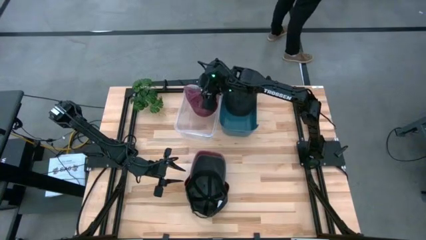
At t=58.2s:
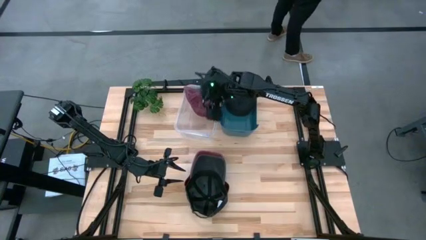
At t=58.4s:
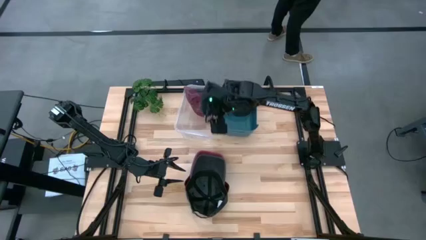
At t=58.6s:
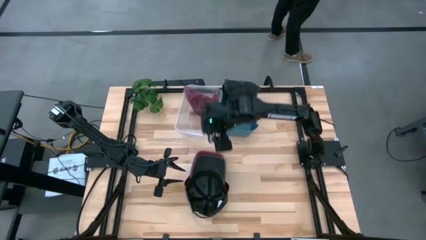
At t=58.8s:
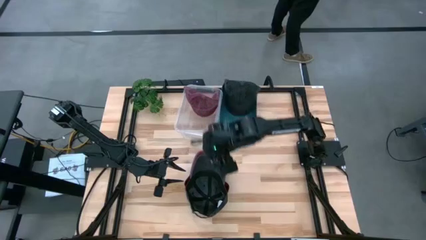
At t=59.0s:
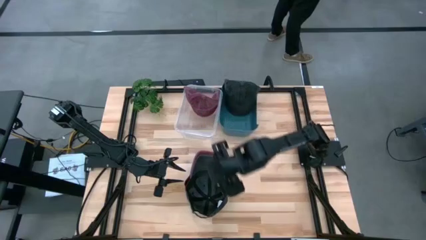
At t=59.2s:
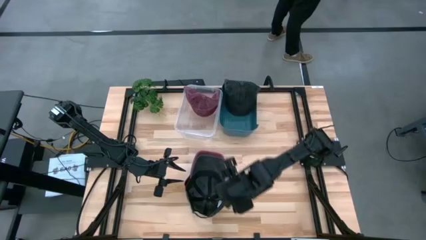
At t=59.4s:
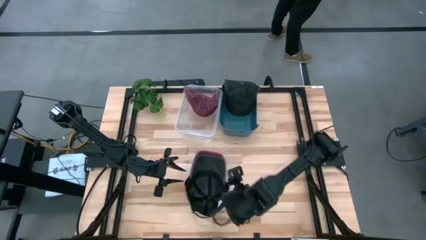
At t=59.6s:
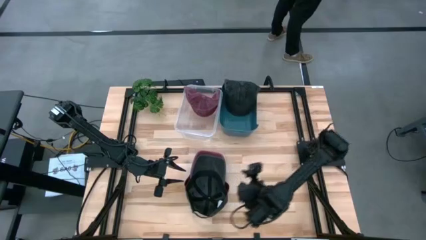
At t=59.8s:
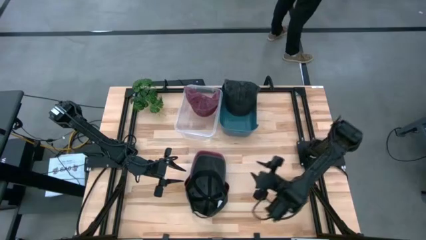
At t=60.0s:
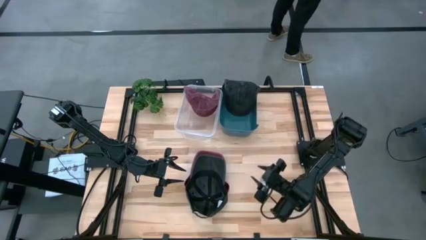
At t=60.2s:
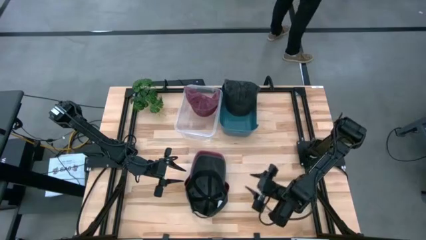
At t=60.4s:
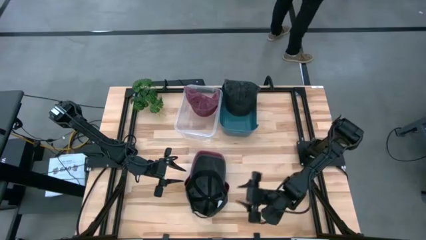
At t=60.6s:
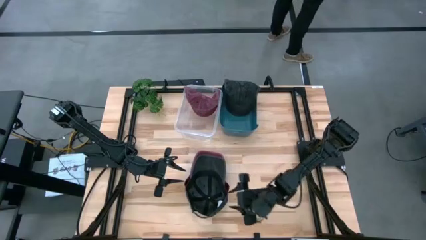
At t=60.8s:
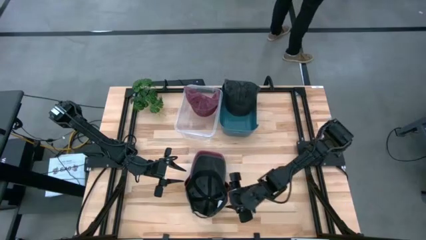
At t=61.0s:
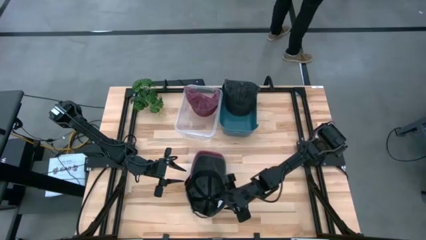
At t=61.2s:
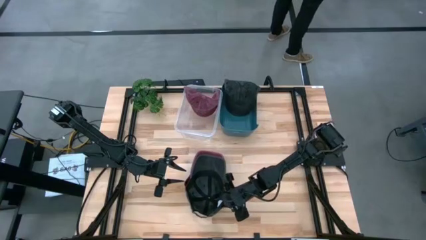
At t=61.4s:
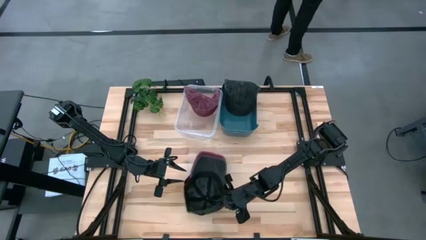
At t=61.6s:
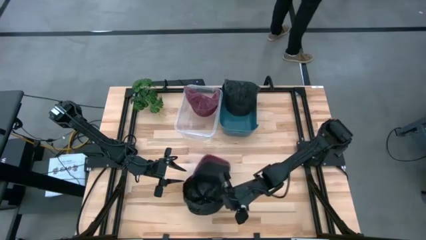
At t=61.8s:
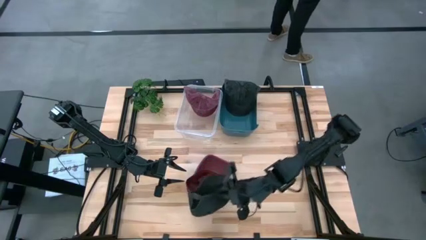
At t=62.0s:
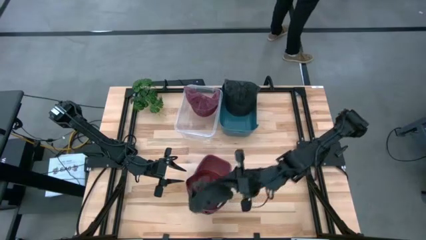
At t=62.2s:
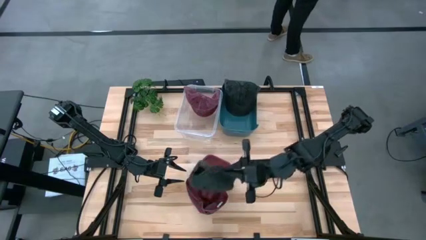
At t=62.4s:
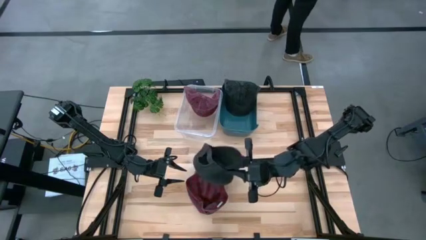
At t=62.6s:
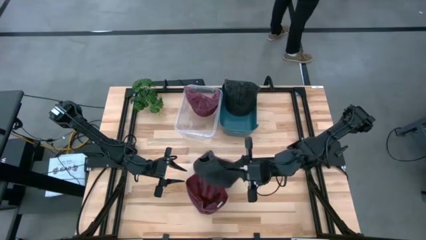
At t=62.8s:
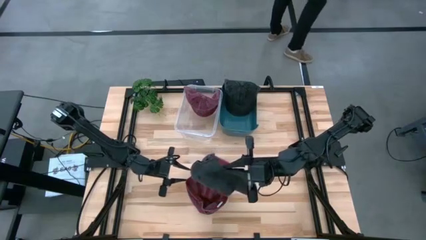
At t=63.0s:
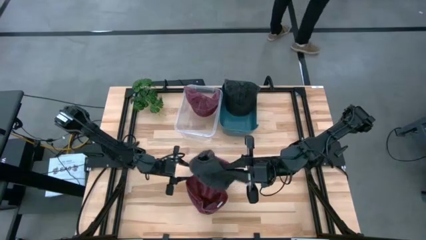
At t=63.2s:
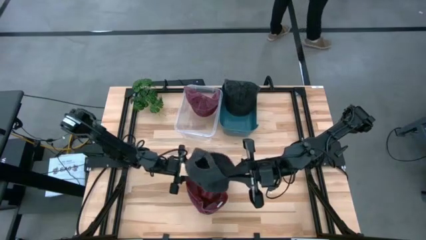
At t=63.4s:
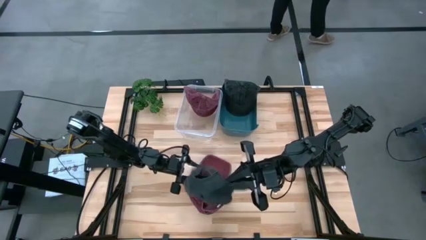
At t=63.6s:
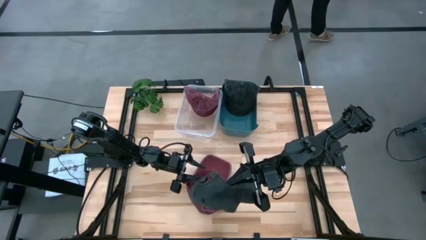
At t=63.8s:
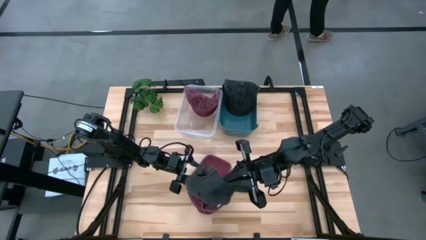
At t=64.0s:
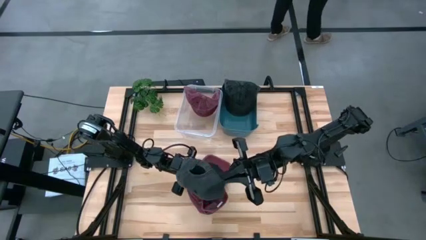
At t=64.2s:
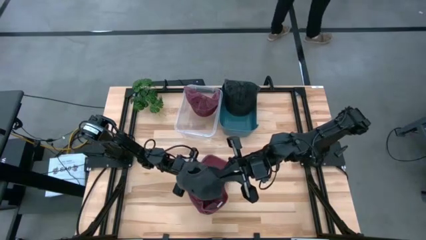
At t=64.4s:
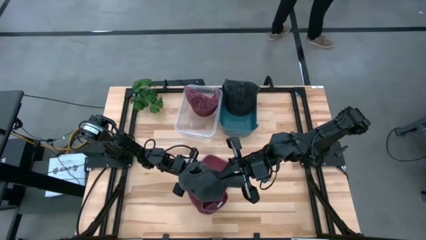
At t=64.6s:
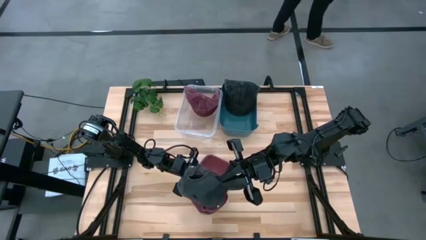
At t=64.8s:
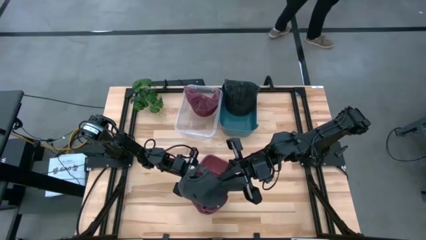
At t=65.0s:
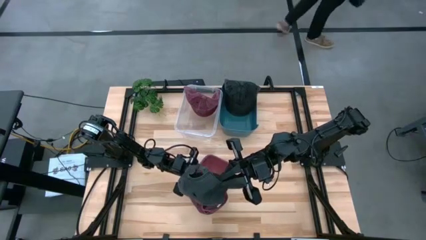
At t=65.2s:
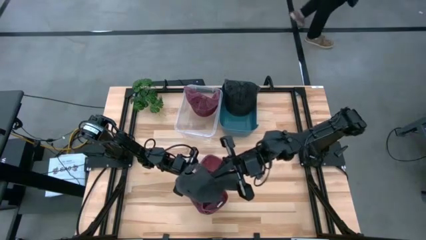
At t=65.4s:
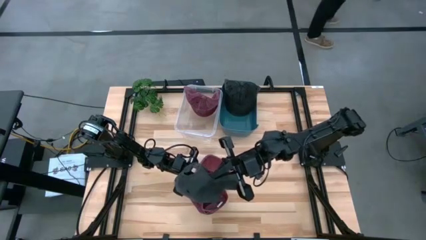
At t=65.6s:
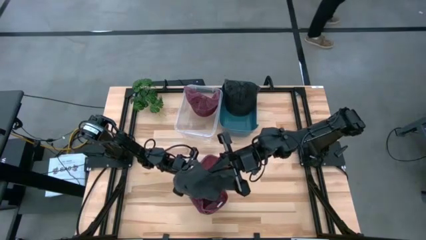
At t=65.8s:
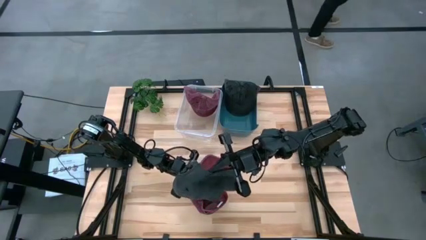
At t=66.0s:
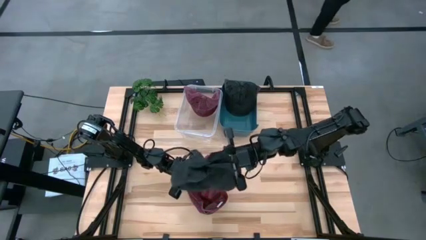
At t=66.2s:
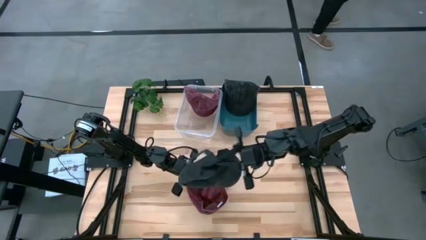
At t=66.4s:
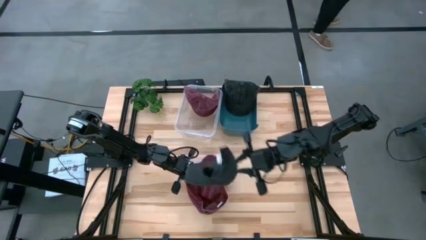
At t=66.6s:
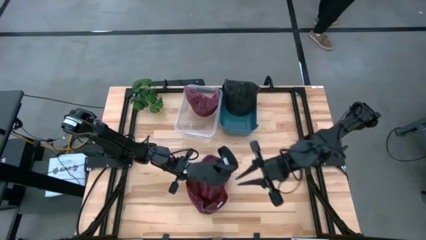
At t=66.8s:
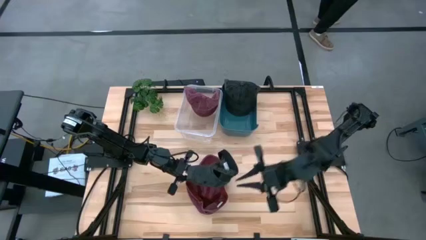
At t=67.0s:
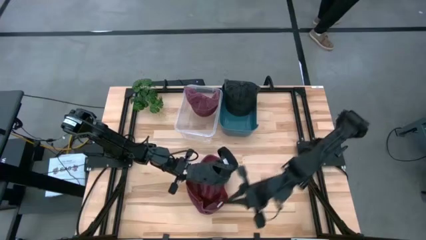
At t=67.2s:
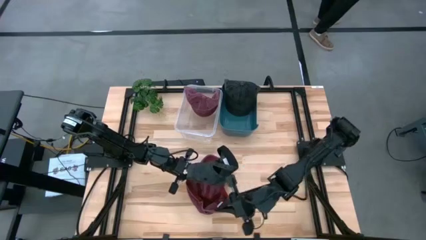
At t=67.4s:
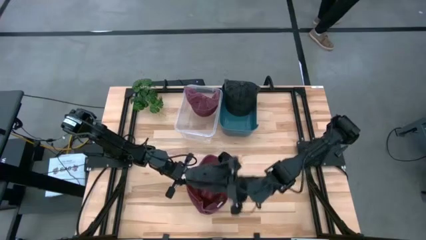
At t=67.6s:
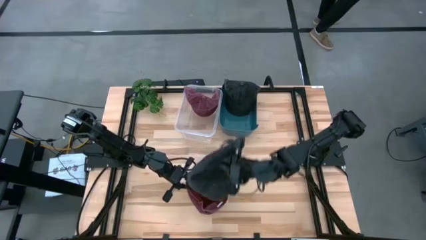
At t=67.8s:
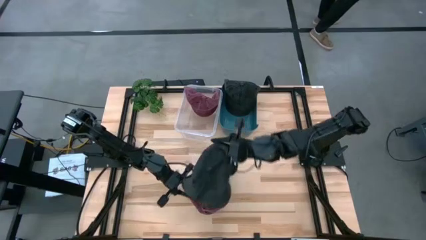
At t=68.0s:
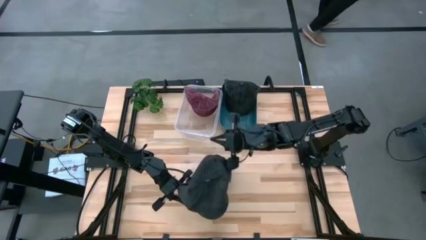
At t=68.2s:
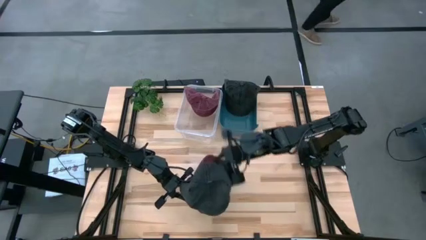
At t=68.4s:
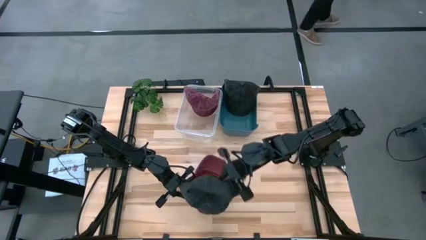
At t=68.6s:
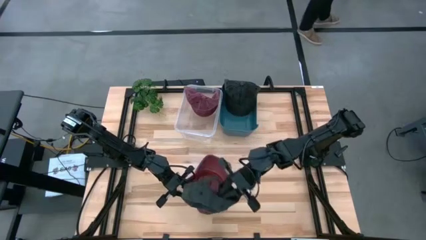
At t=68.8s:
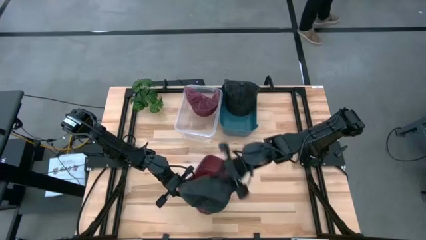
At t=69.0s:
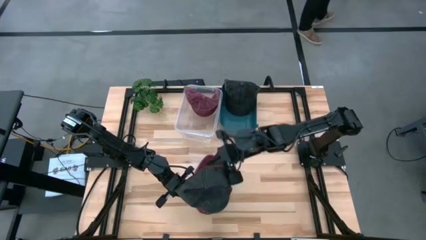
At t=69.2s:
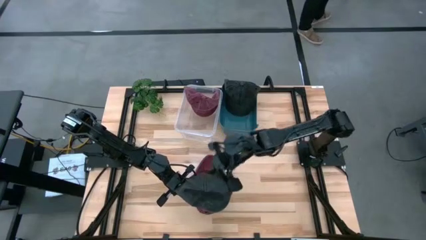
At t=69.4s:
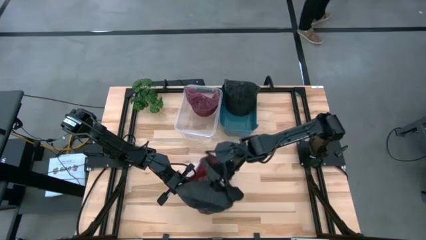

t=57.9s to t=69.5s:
Task: Pick & Place hat
Put the black cap into the blue bin

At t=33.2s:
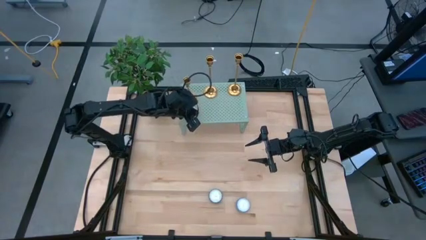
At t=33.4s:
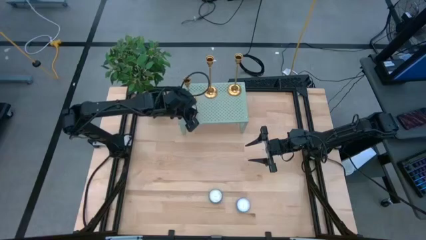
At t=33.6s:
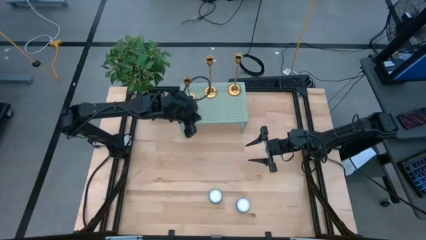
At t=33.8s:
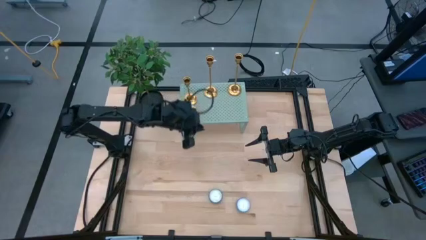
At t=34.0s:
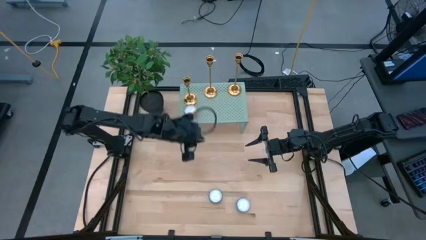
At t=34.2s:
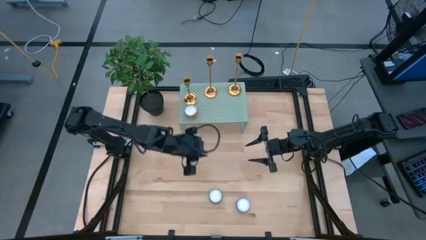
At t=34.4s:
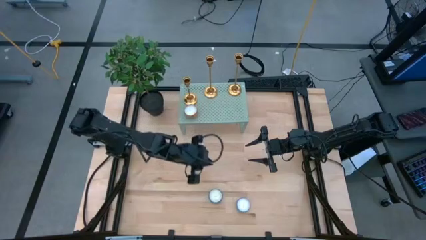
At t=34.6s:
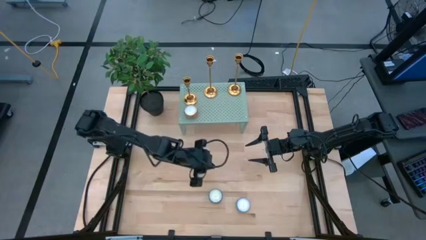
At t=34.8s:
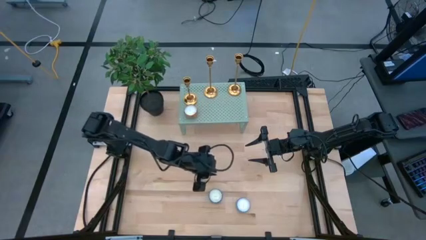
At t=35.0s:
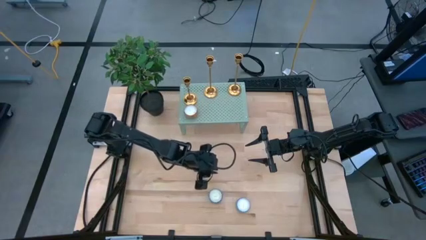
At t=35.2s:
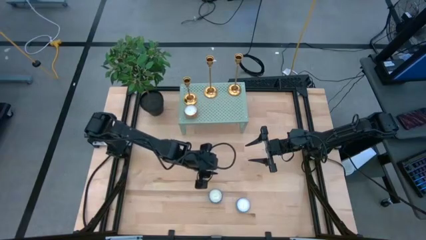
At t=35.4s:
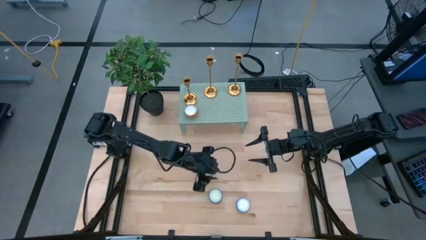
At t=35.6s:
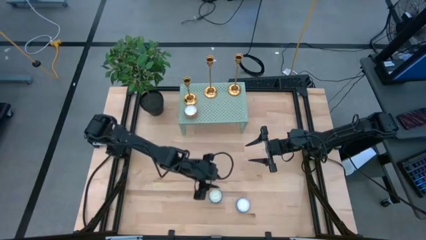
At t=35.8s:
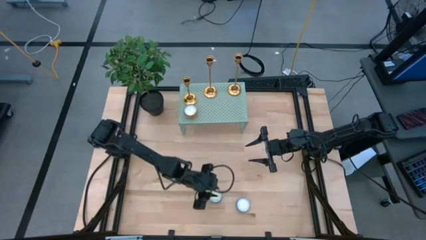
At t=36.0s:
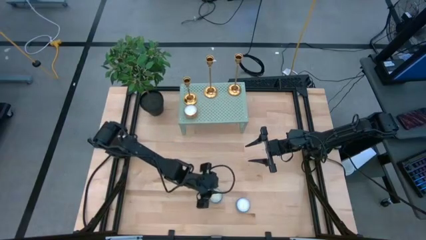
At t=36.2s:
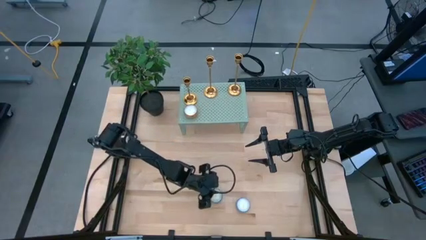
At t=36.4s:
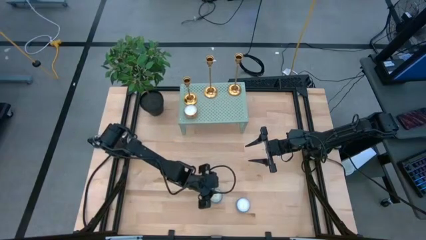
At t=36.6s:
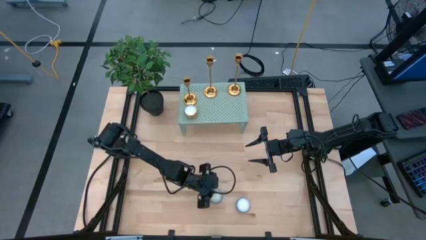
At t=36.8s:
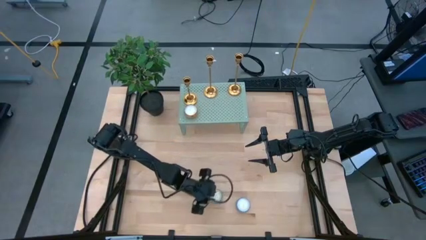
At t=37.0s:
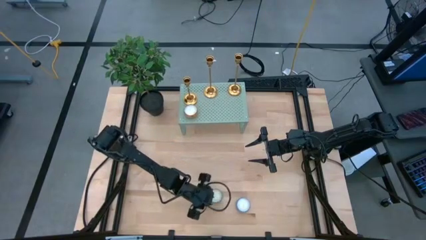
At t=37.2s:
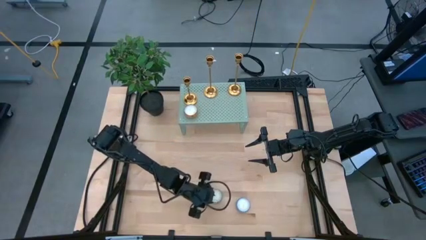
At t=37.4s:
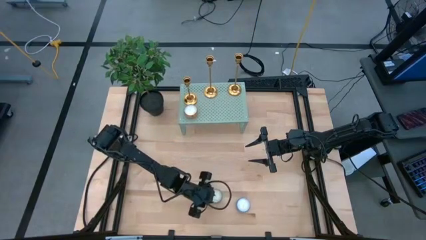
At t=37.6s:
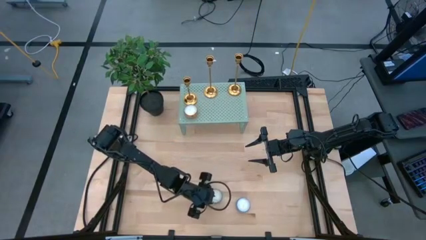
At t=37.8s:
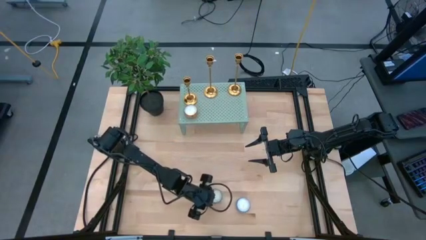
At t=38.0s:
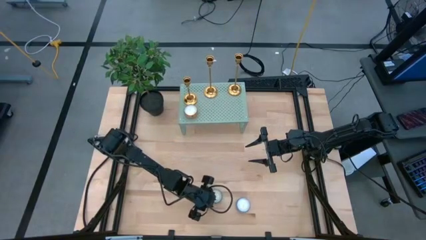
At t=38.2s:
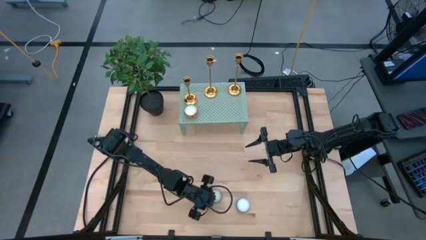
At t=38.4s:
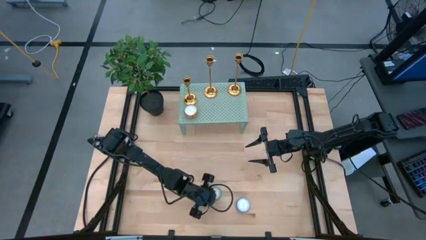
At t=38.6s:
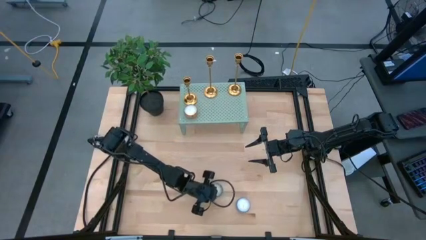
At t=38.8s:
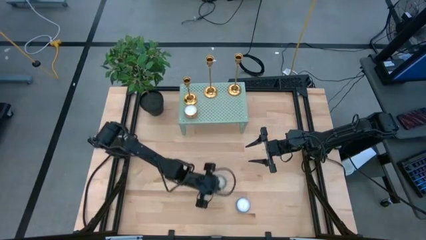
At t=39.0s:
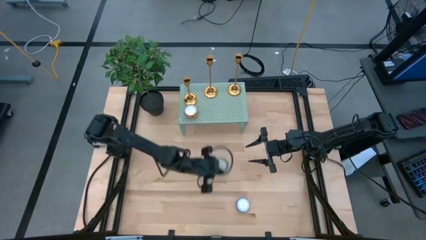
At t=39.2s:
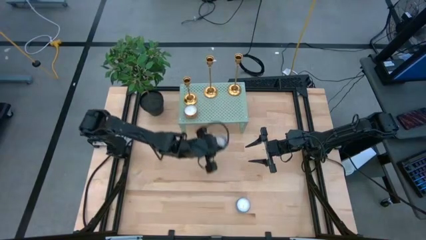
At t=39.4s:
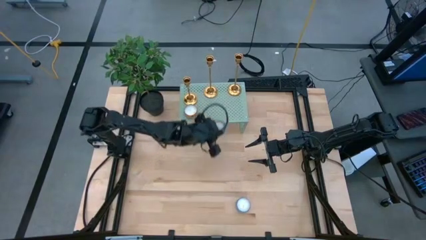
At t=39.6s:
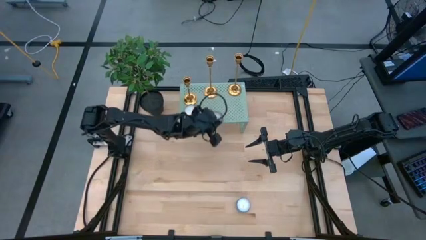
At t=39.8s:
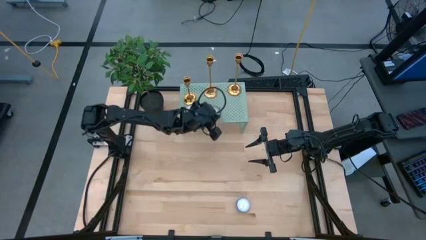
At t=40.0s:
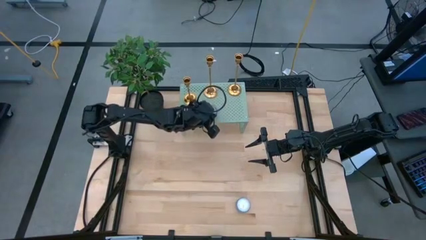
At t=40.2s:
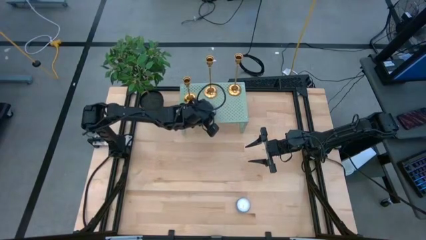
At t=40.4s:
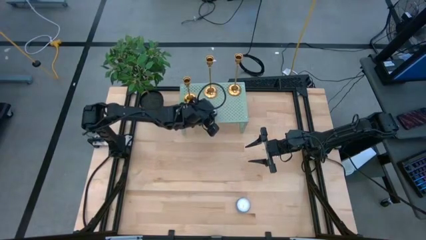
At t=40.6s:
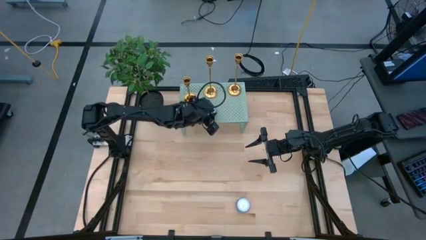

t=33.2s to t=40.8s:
Task: Pick & Place candle stick holders
Put the dark blue scented candle on the shelf
